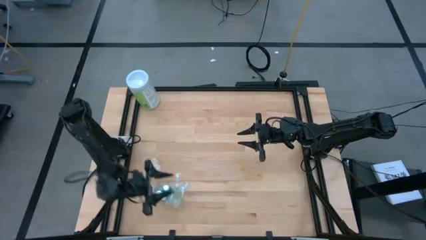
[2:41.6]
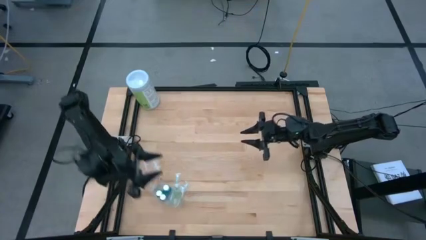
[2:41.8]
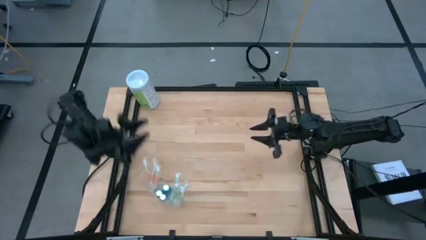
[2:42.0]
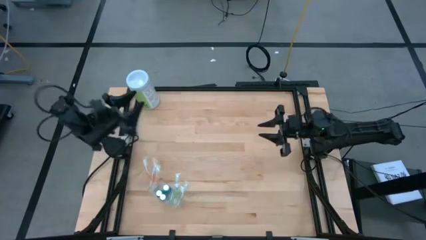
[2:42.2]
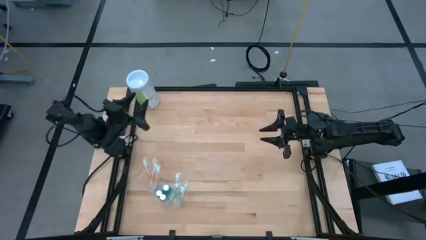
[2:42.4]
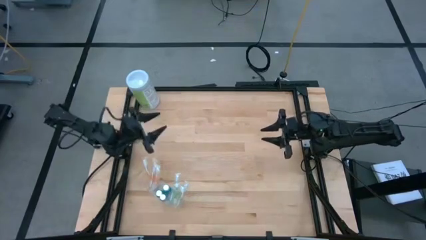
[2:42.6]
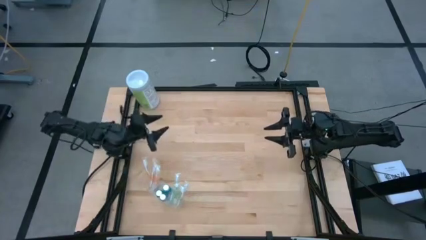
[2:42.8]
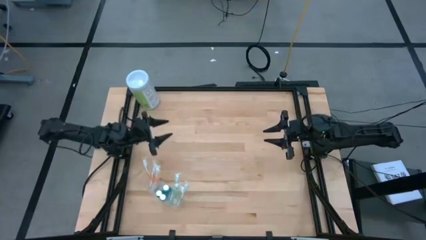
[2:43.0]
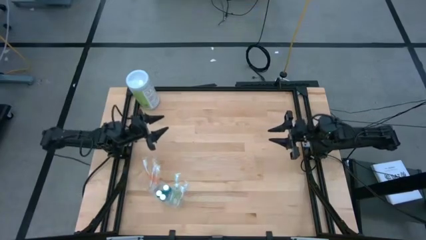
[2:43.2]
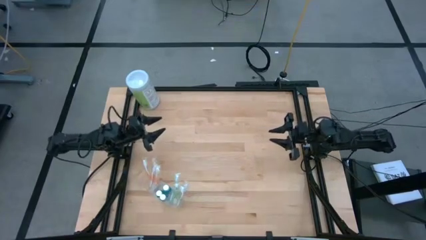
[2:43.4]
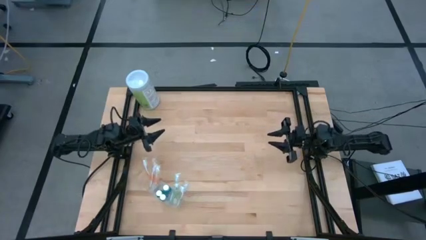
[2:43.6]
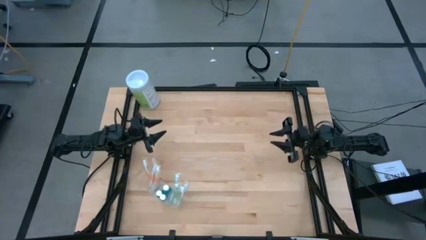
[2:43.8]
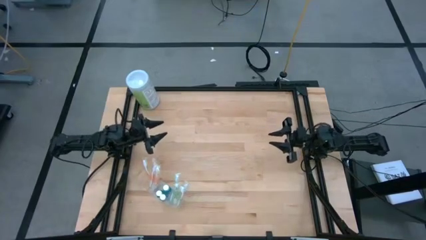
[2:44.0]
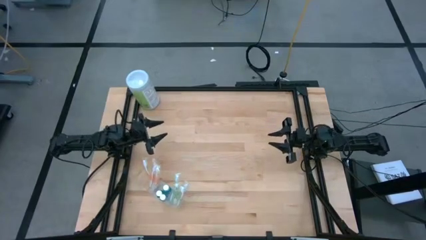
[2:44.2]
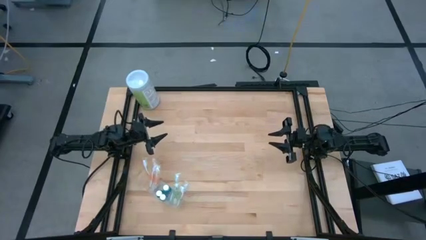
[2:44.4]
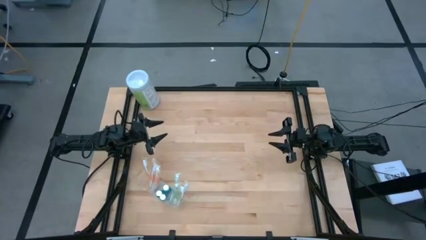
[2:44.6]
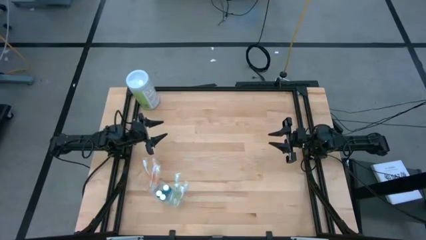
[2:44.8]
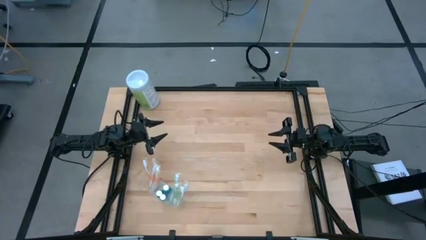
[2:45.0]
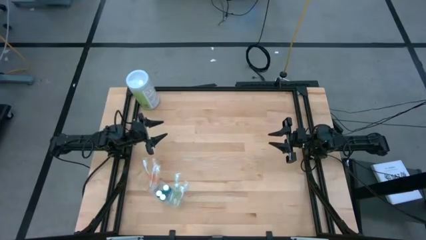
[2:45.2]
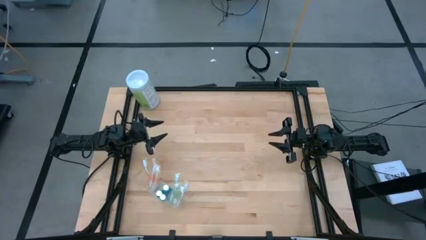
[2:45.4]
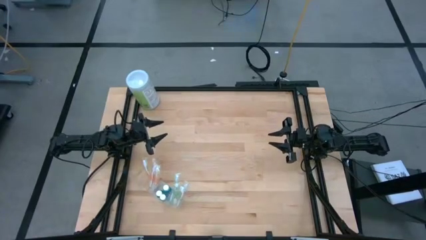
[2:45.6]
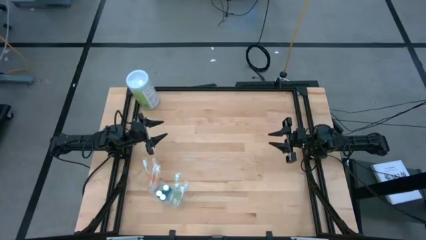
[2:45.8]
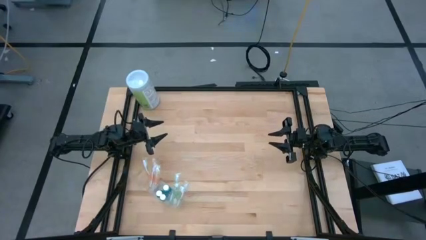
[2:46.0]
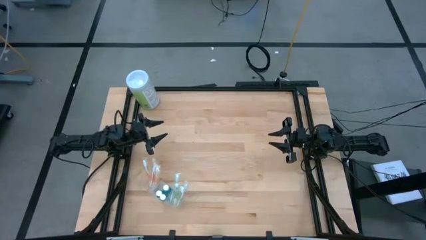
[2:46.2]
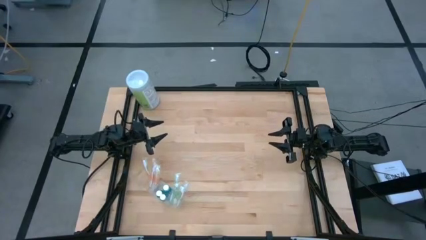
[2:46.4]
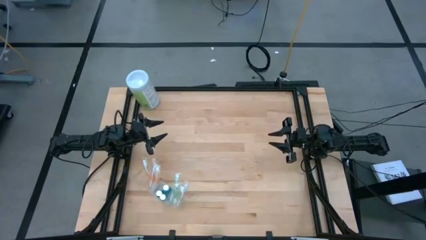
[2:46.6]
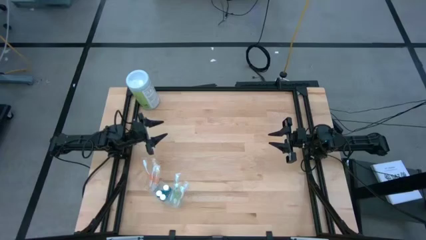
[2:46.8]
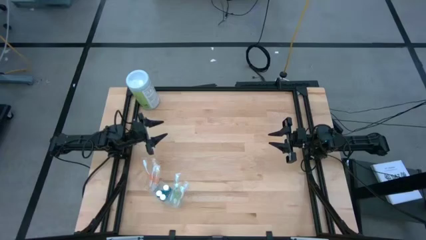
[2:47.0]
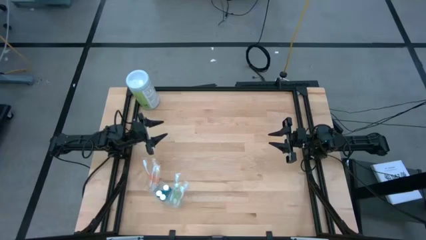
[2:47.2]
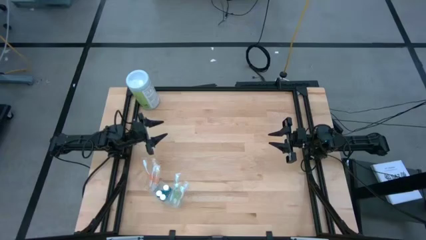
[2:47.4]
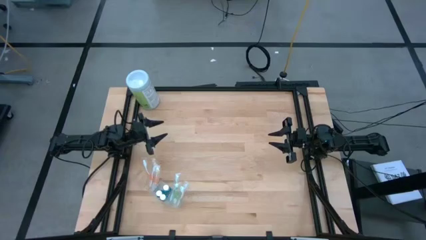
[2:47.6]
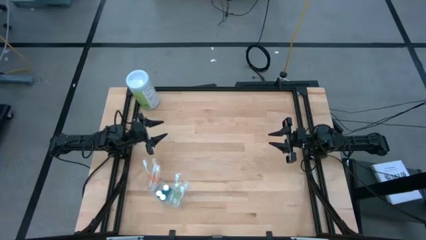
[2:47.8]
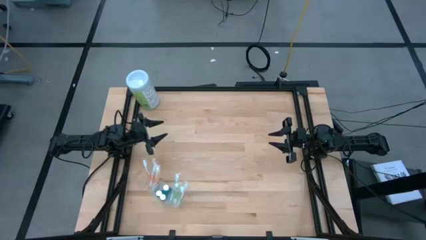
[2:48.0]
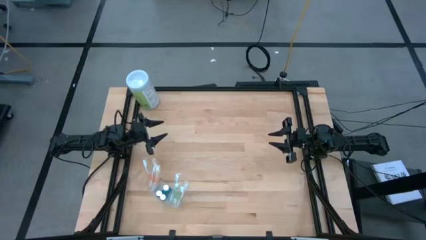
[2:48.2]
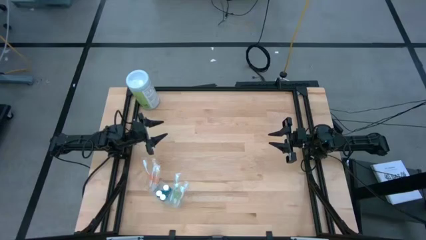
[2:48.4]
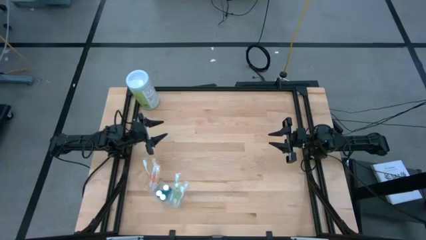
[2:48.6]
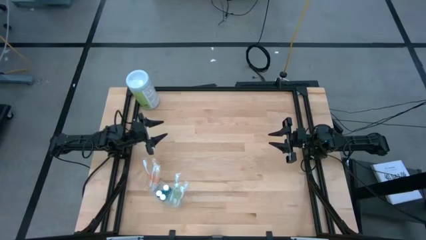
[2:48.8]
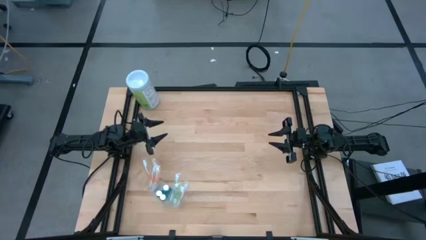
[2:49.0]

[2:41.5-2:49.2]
Task: Pick & Place toothbrushing station
Return to Home Position

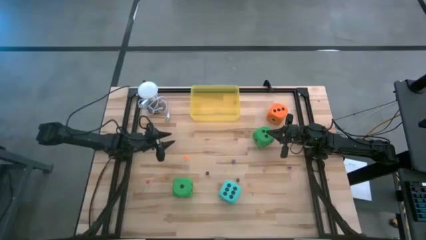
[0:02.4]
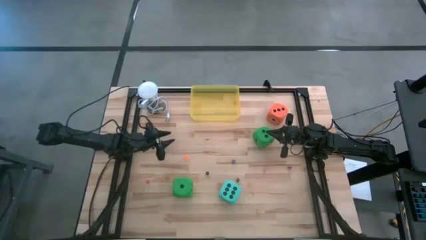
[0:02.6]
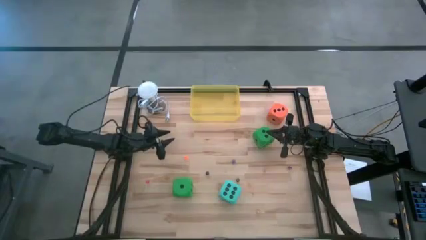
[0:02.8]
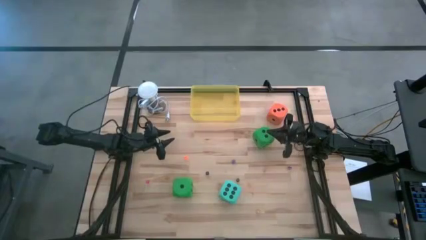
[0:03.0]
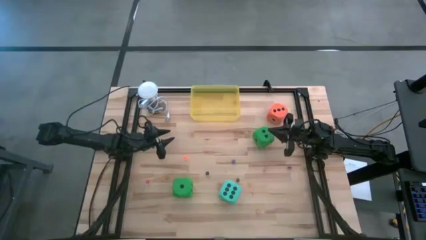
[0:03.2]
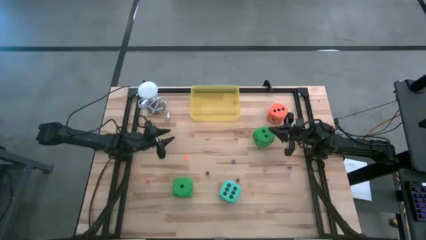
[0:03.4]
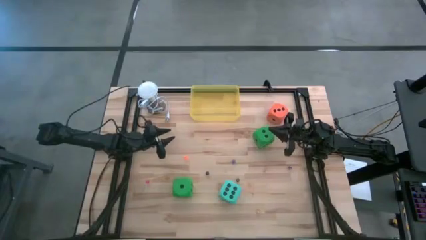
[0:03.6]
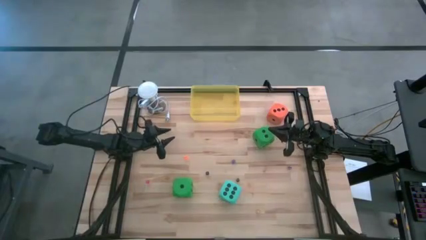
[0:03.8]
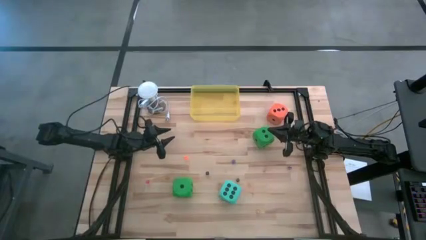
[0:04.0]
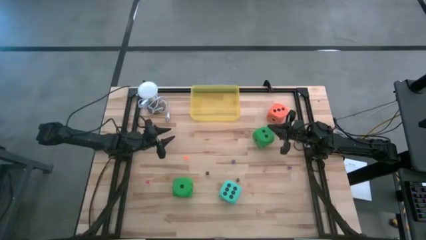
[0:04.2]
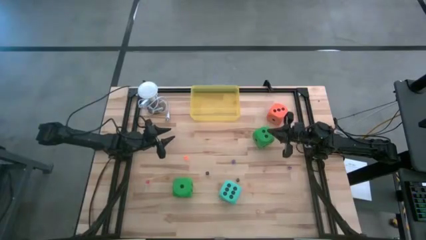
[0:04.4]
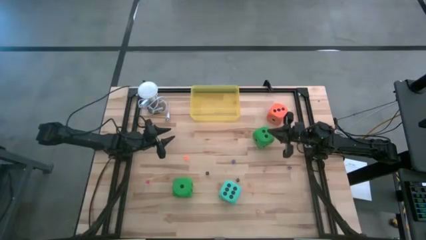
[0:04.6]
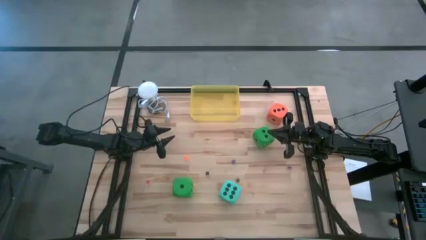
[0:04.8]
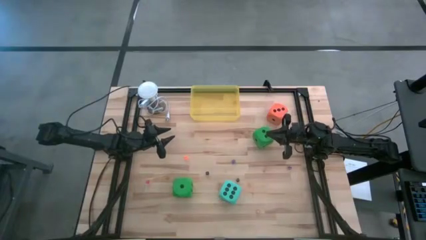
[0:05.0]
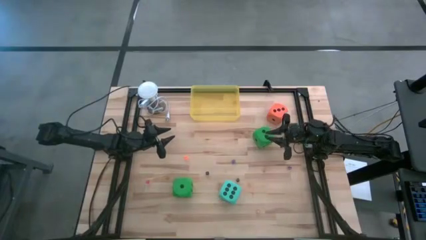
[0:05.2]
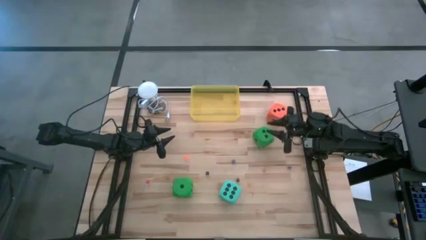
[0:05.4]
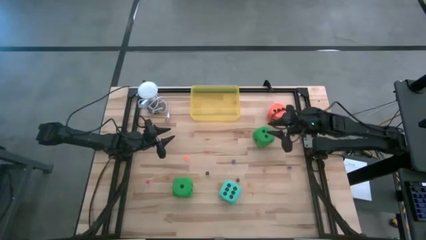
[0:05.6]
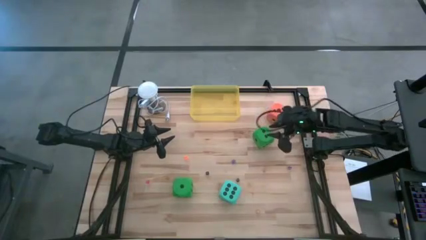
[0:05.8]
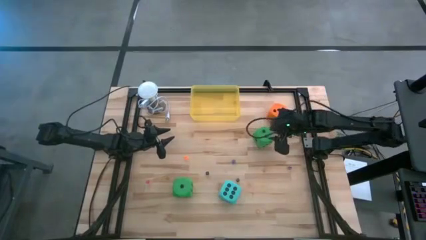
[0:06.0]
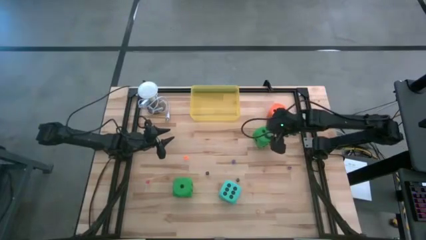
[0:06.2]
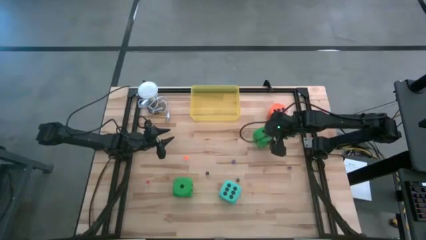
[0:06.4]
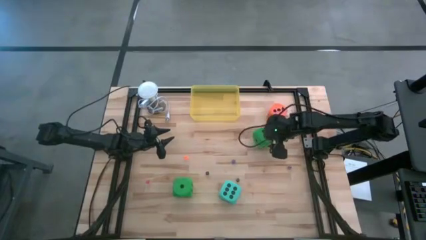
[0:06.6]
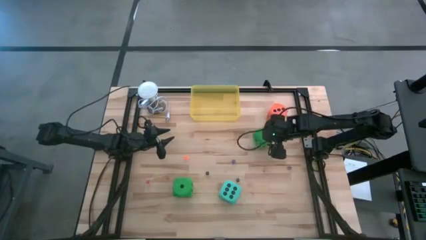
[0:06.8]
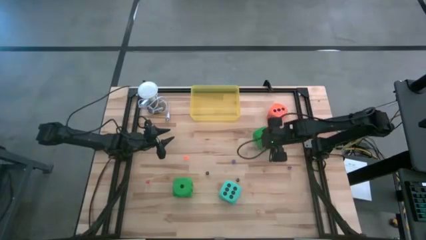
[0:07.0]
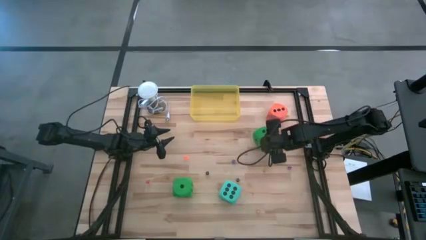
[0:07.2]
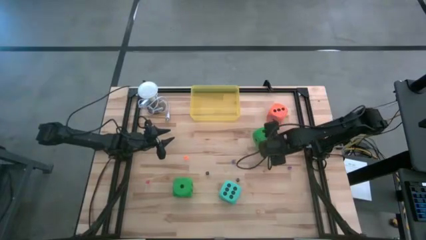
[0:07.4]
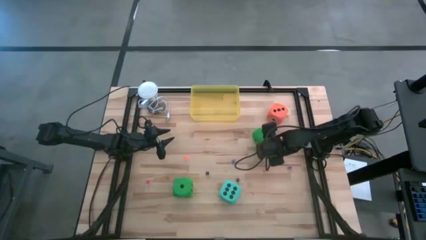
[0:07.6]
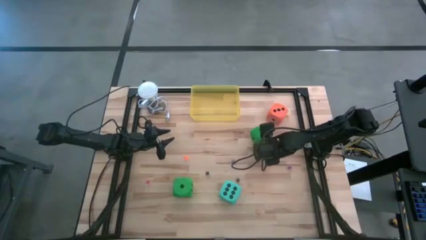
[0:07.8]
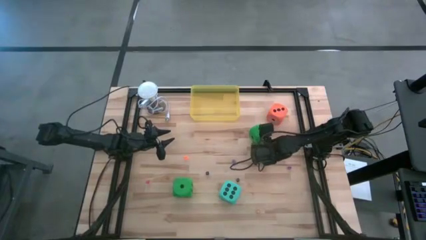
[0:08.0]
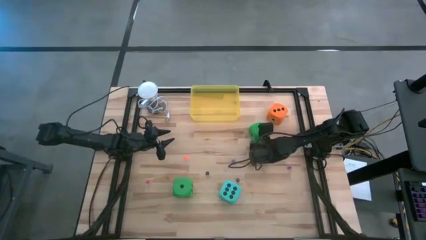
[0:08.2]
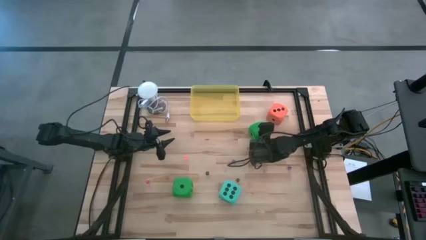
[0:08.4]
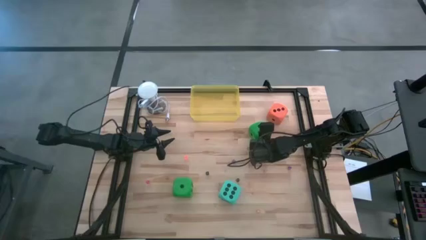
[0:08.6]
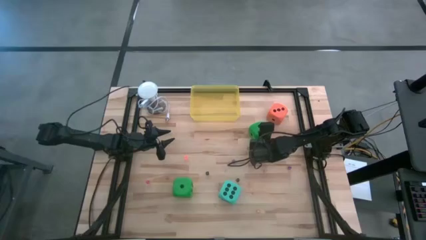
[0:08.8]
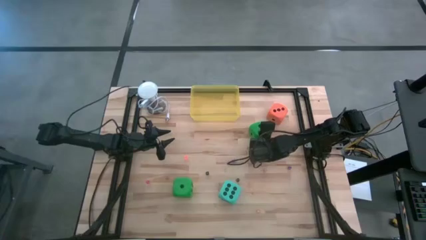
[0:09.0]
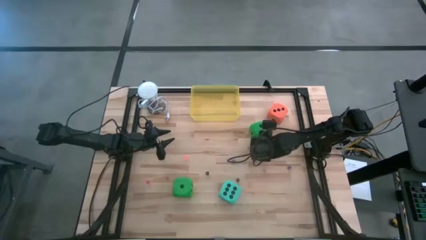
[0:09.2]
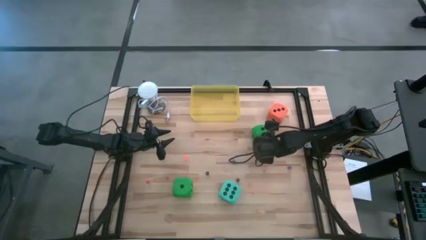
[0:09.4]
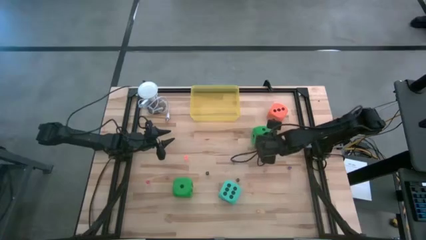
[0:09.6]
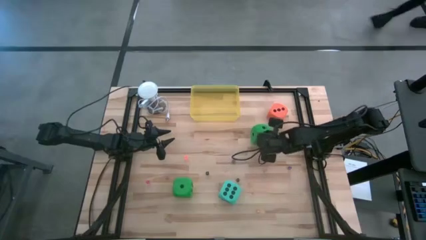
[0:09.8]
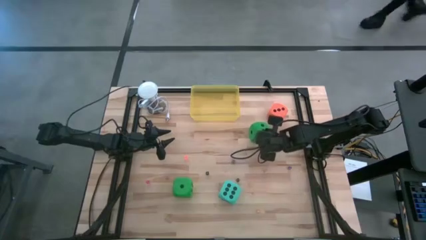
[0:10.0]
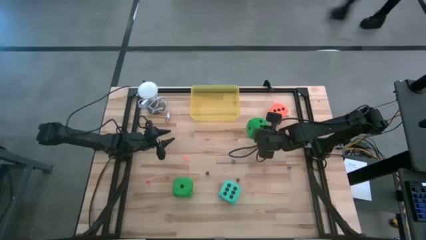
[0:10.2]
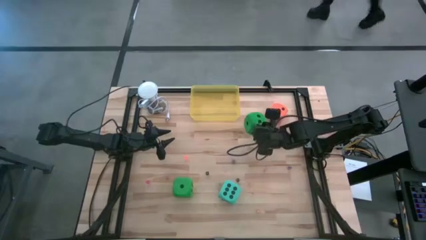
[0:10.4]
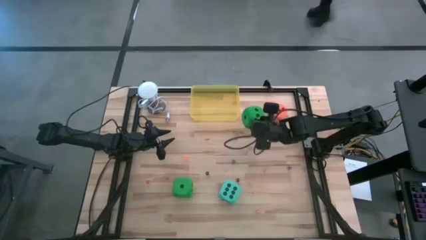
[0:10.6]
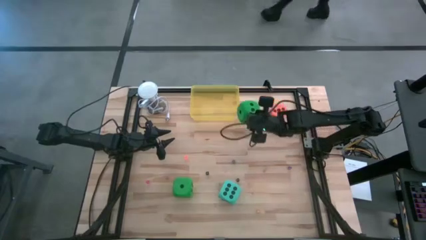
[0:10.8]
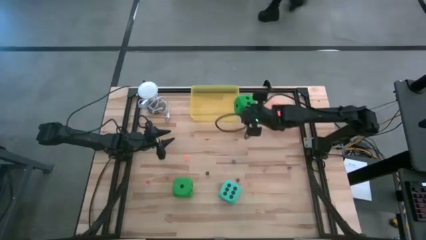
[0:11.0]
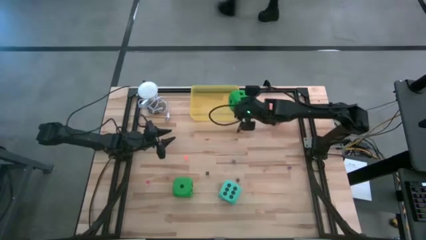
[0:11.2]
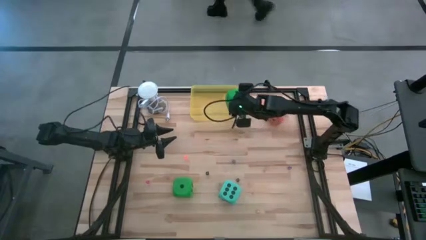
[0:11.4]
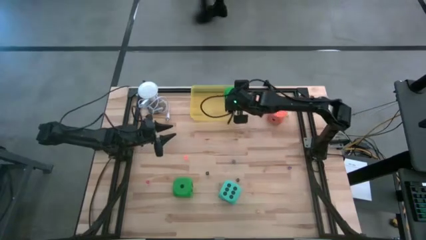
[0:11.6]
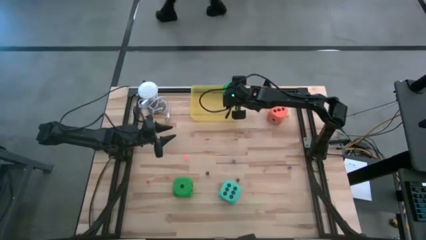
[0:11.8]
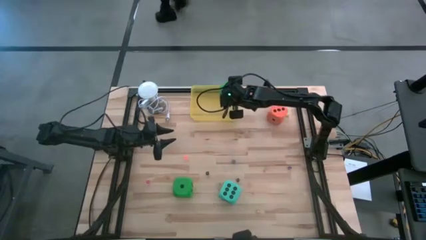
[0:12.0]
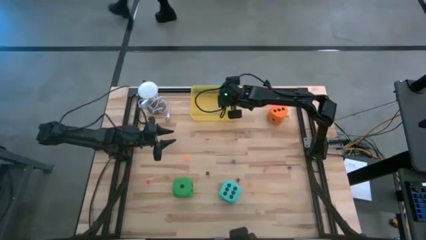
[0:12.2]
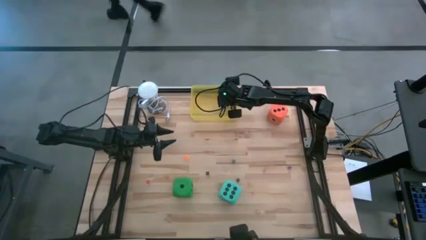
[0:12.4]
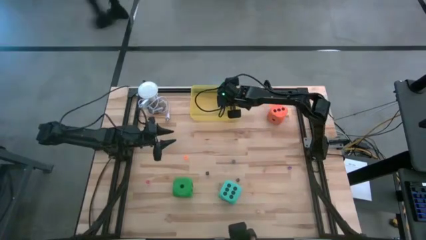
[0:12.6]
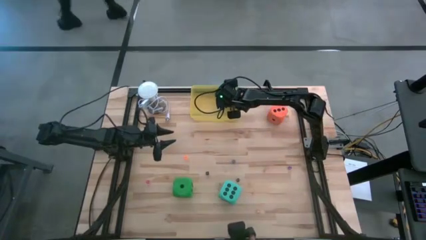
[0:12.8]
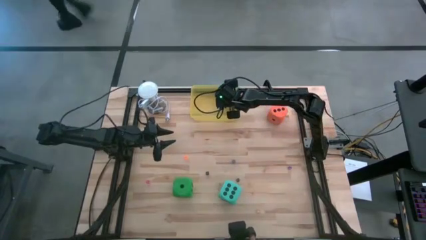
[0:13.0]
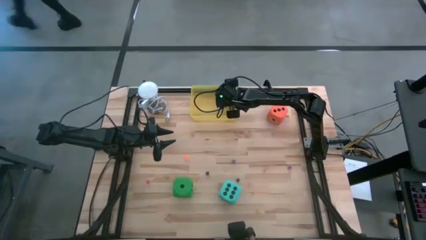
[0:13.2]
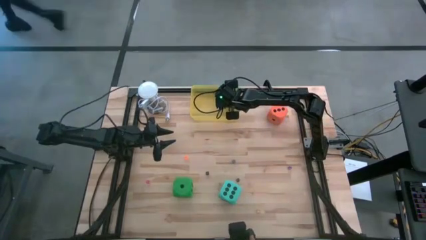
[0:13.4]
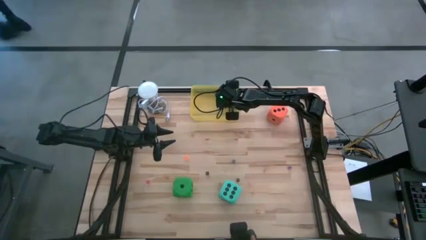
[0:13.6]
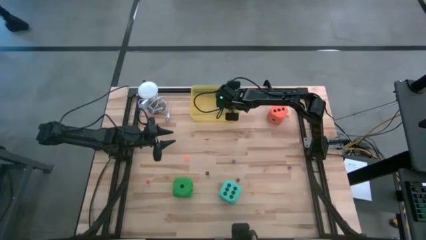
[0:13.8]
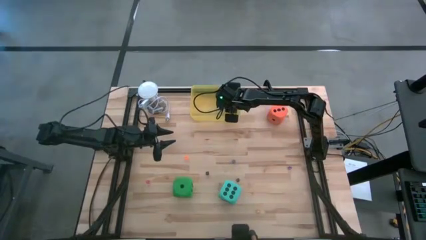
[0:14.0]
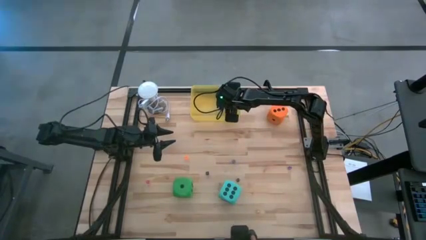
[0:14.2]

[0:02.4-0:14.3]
Task: Pick & Place Dice
Put the top green large die into the yellow bin
